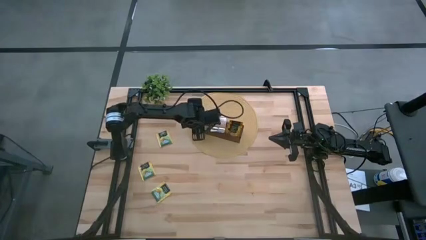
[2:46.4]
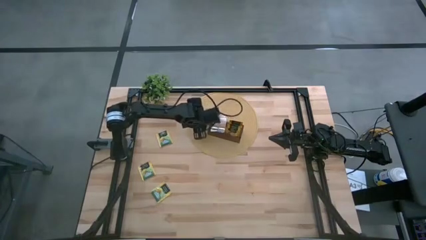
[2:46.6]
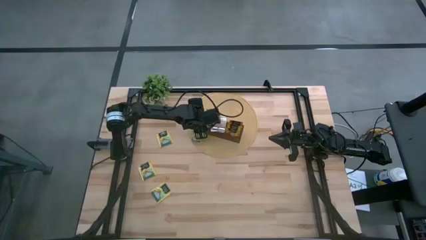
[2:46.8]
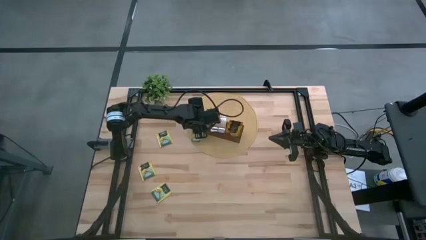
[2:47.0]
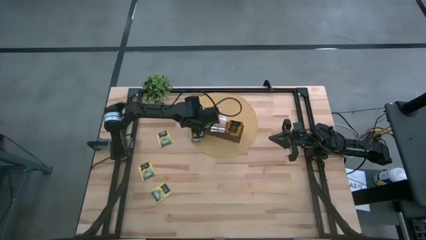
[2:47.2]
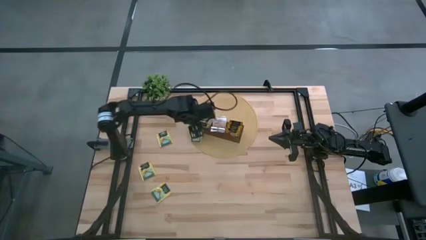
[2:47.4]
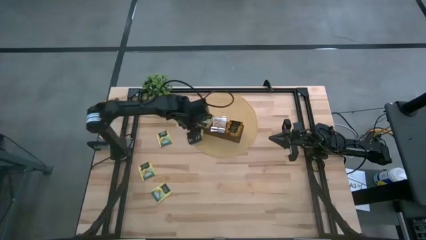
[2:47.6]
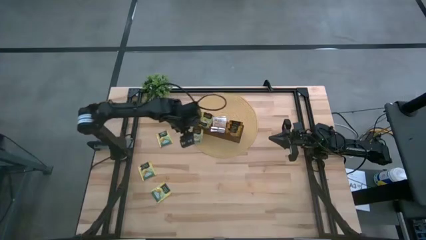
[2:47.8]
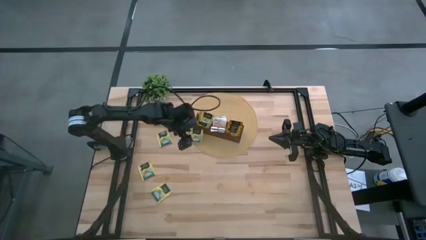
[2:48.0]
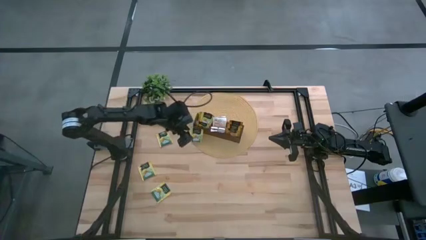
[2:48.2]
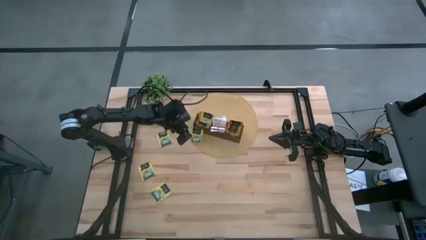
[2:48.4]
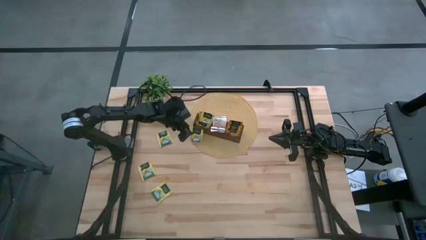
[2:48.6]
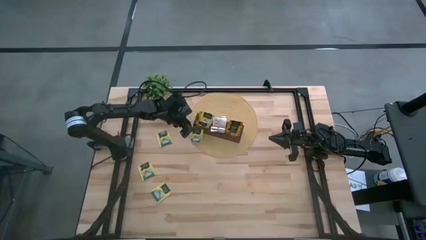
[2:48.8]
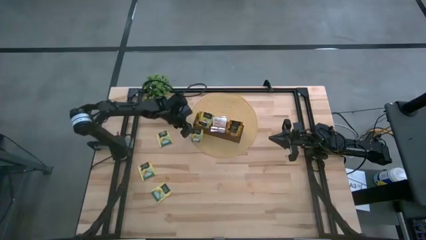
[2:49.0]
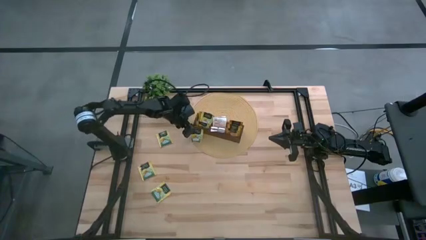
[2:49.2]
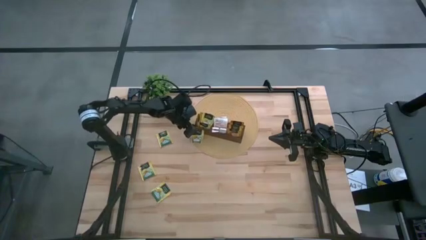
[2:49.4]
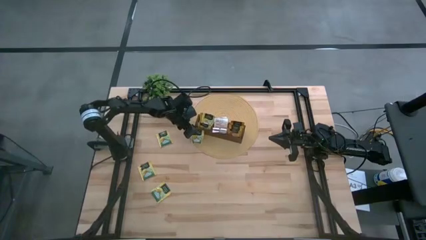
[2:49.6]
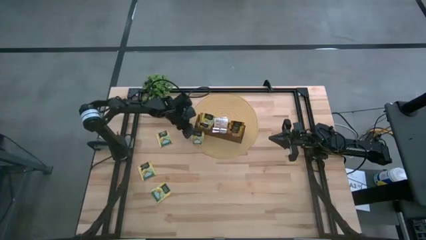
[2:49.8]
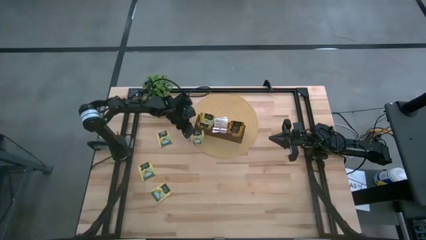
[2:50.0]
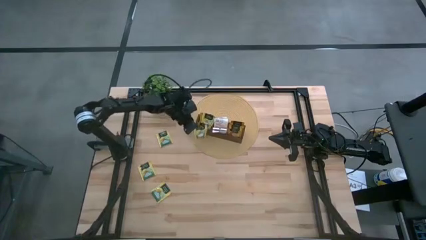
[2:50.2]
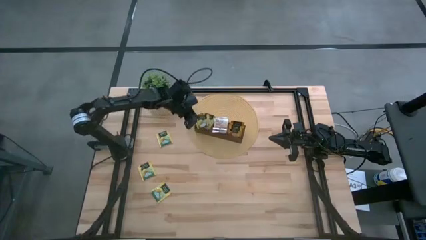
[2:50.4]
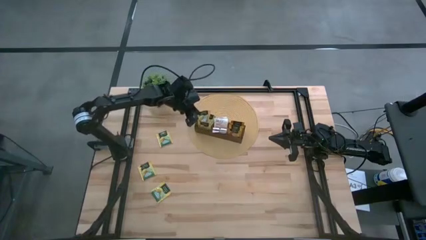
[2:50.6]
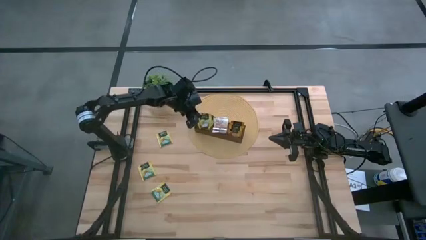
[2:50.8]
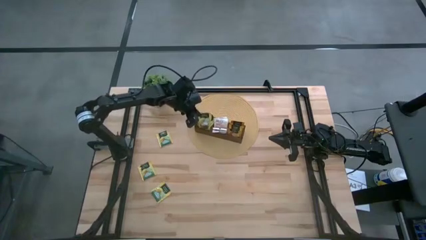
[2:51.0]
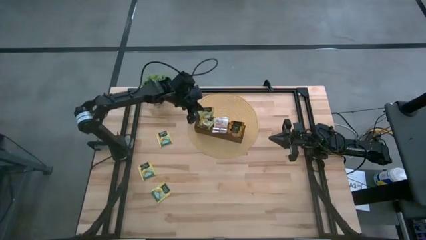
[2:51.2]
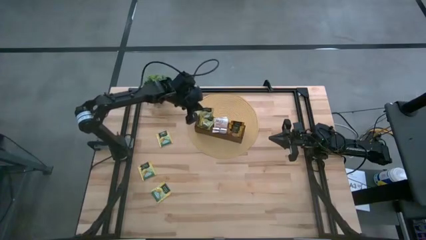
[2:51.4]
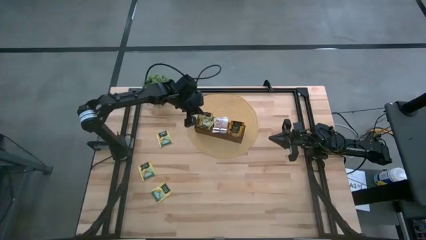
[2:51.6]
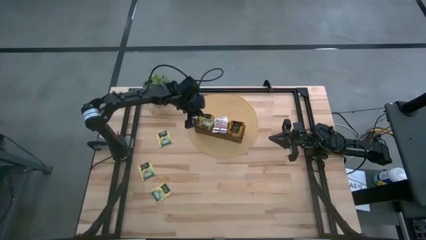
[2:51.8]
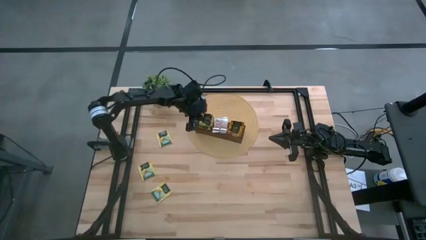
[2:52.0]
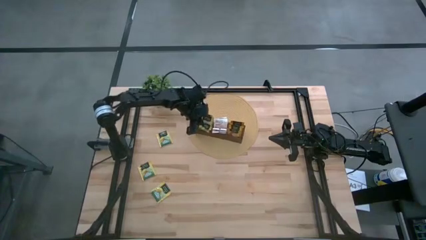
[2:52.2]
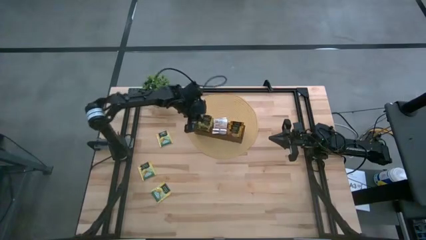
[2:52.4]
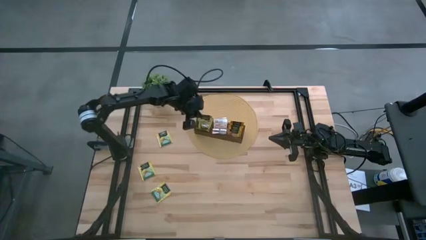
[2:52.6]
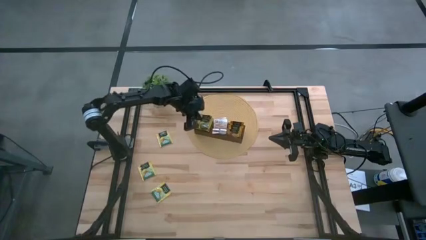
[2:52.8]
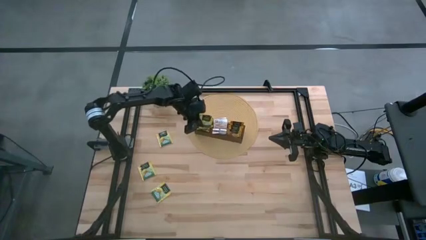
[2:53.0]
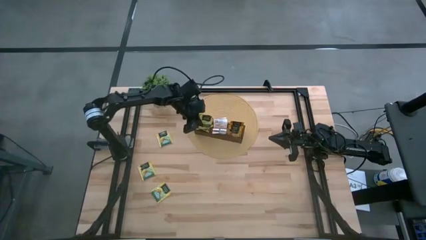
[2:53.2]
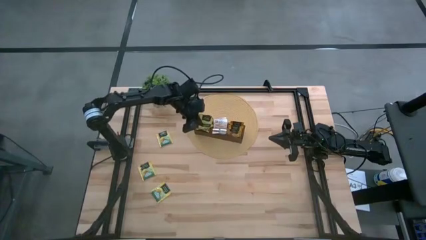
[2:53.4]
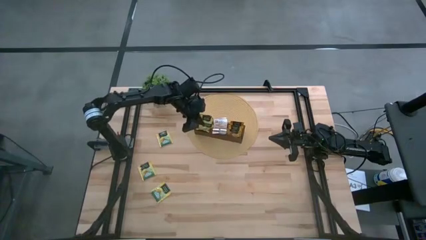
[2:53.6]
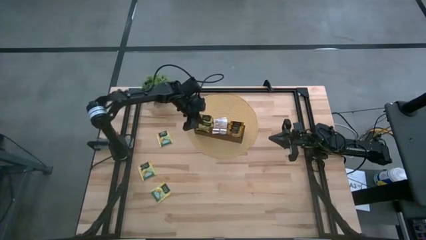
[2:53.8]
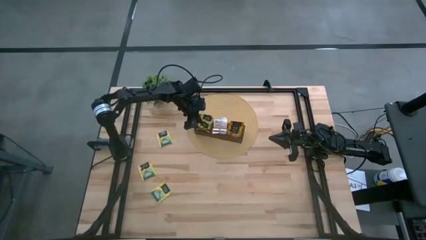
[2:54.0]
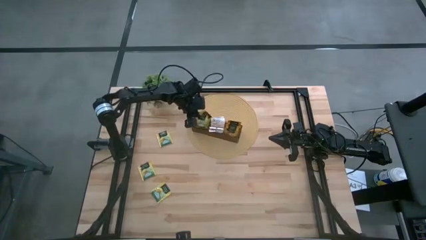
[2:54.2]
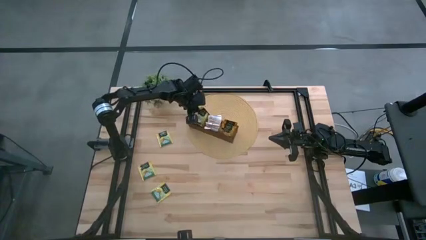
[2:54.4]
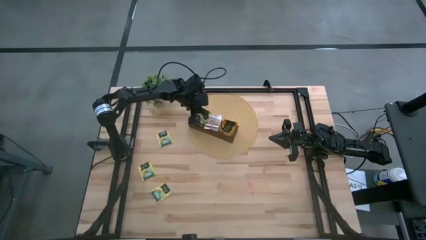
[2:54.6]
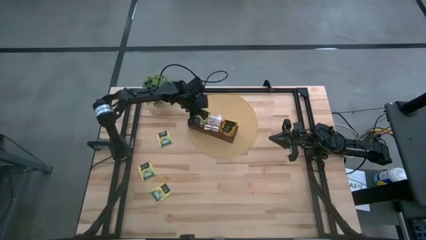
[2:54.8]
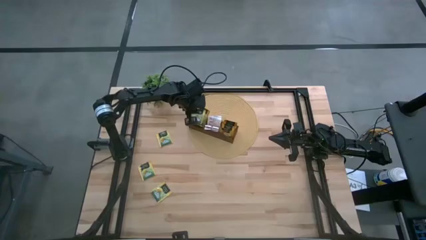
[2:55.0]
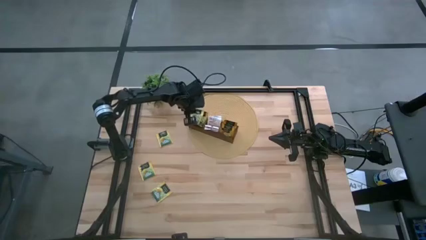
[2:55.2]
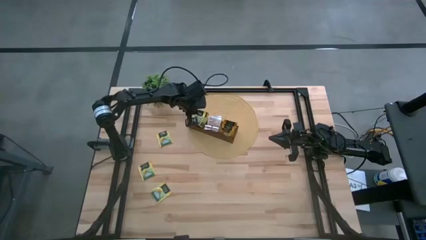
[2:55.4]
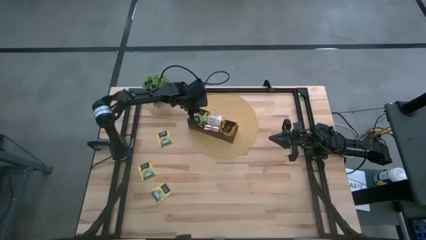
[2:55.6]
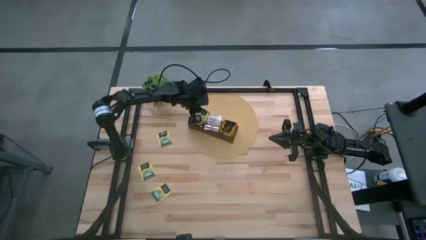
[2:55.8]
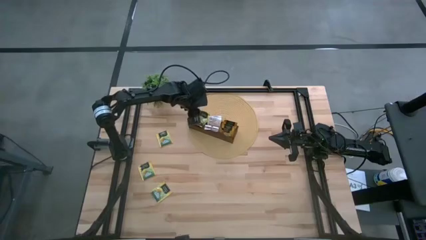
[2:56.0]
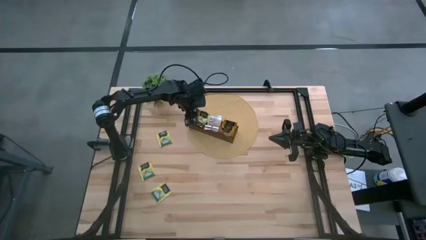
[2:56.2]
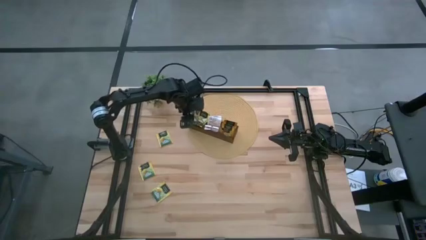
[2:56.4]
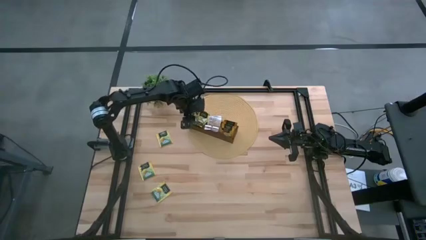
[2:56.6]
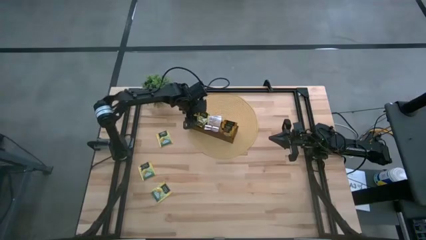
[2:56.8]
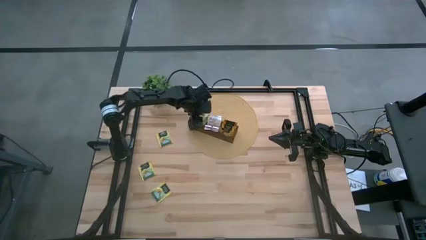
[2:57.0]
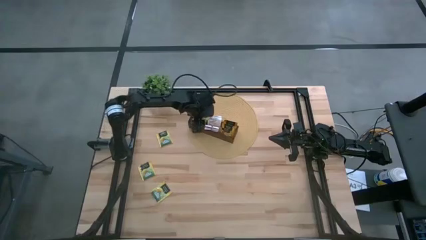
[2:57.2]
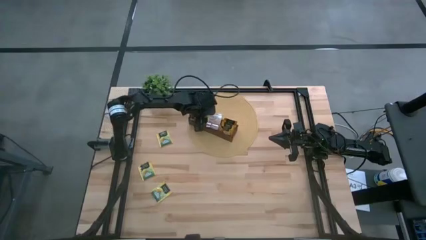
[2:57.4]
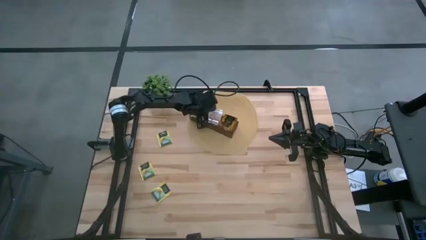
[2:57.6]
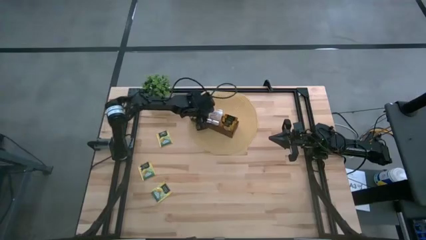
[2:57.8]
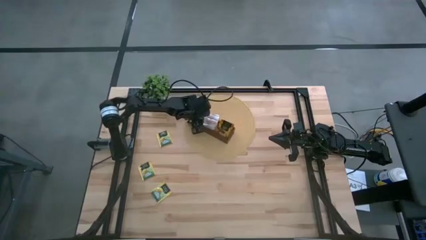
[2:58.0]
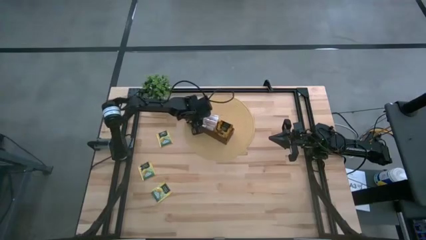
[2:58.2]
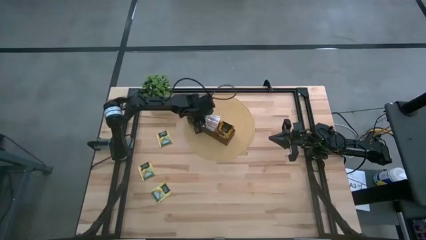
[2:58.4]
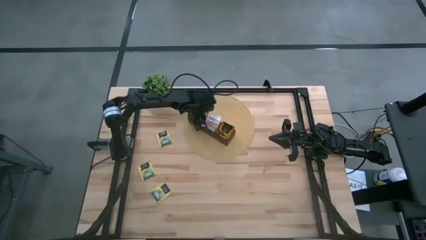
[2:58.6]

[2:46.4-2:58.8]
Task: Pick & Place Tea
Put the yellow tea bag into the left section of the wooden organizer

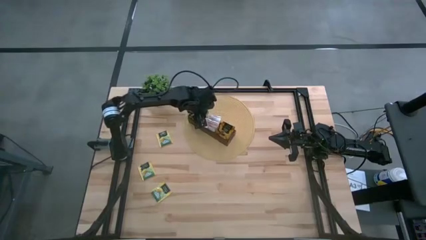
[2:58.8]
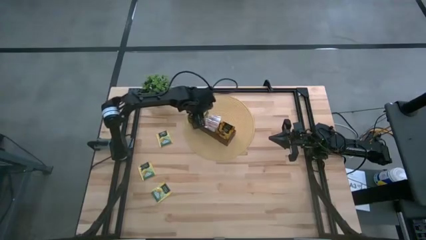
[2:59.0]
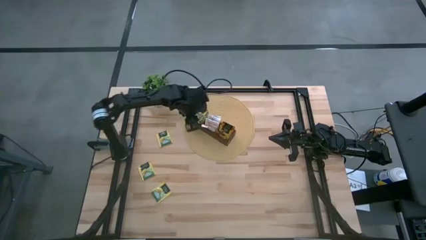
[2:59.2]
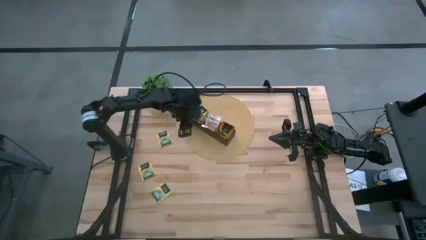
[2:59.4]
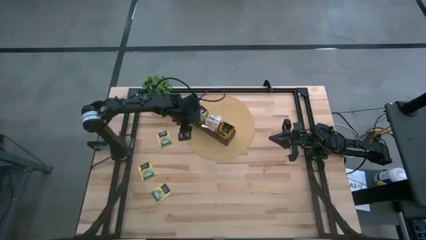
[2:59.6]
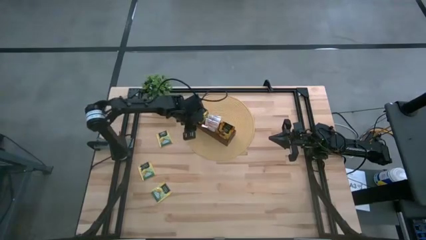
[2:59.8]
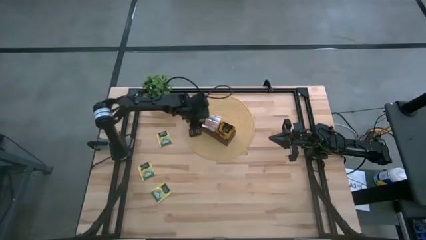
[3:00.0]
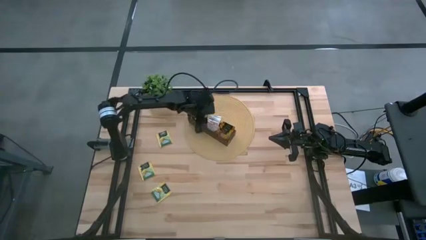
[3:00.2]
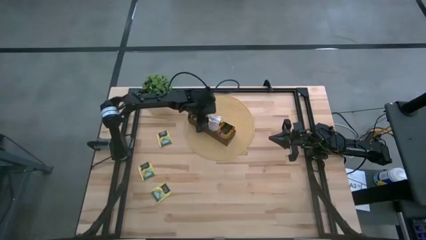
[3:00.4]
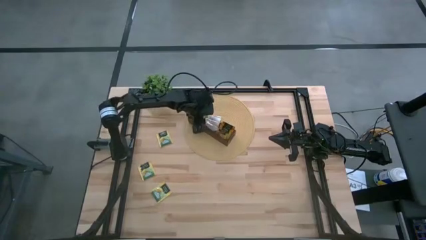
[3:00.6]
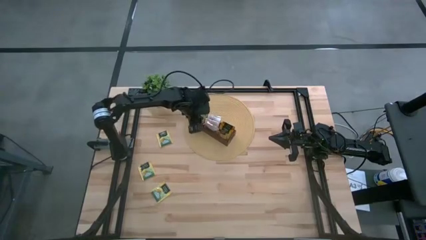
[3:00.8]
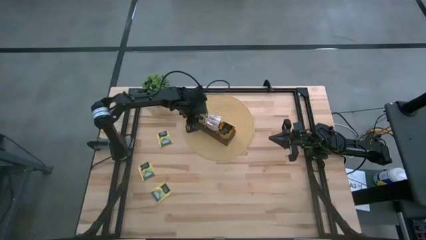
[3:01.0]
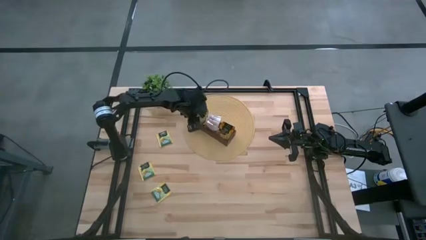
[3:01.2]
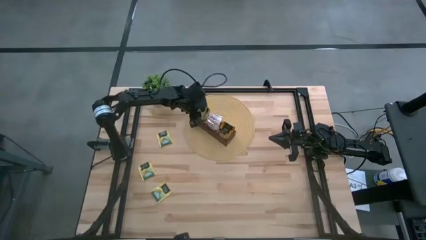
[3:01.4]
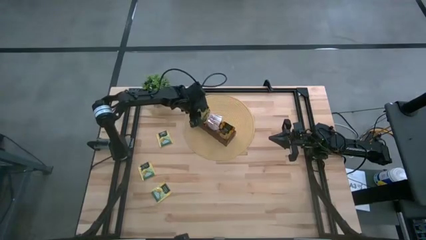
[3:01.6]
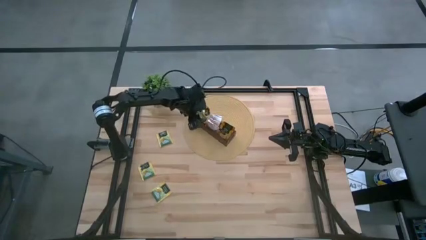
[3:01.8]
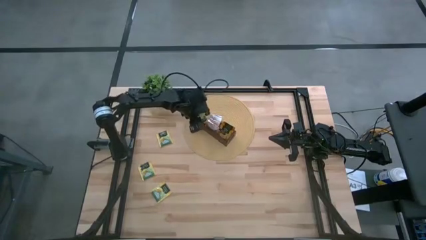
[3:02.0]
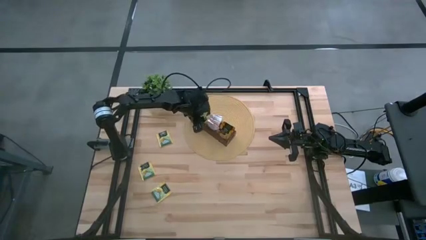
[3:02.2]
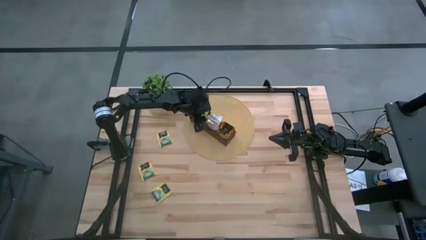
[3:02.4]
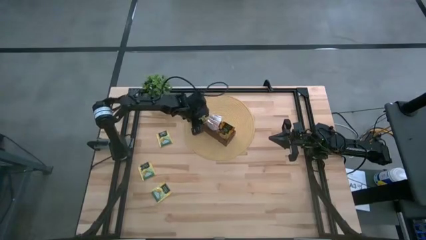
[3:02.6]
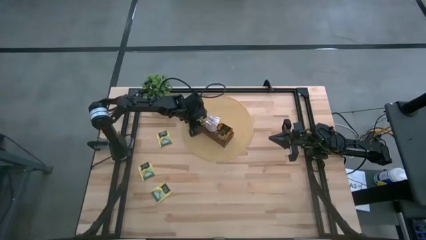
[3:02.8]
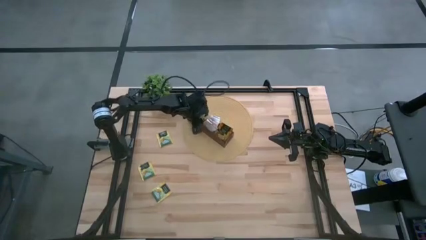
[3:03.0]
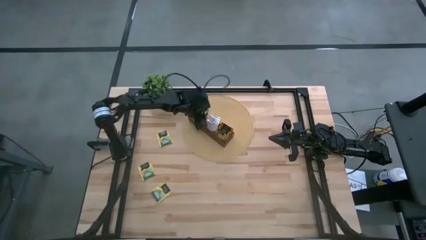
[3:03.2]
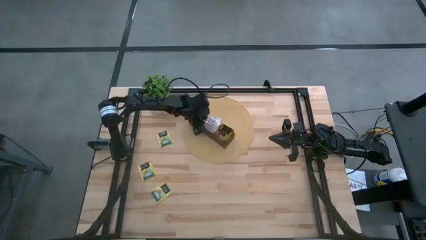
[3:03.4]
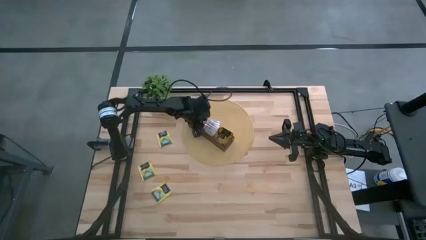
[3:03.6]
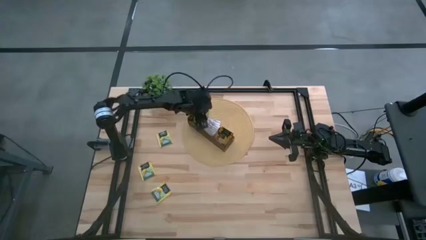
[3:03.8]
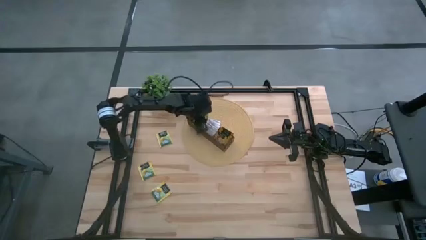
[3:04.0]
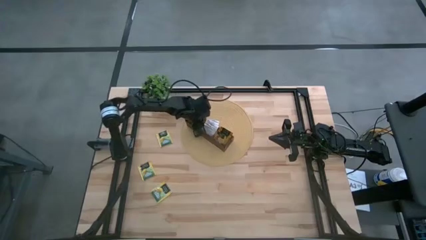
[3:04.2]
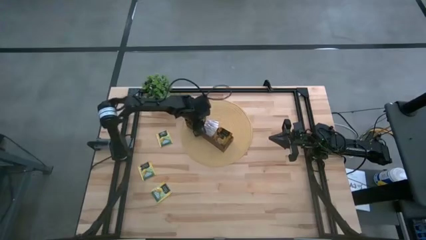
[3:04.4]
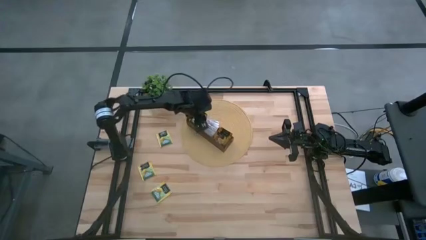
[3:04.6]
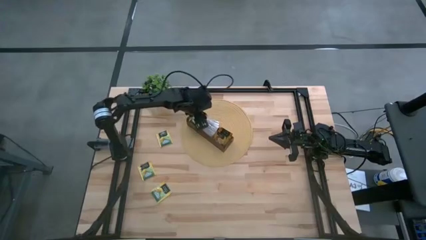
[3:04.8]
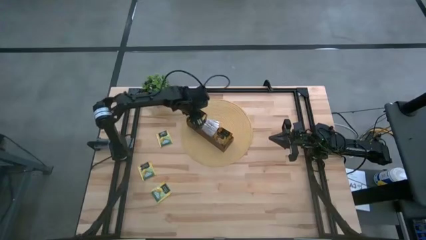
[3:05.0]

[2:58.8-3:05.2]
Adjust the yellow tea bags in the left section of the wooden organizer
